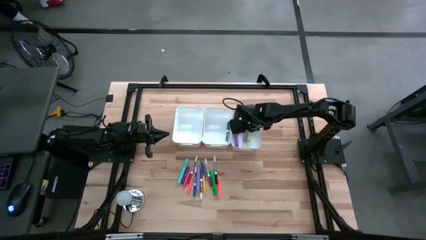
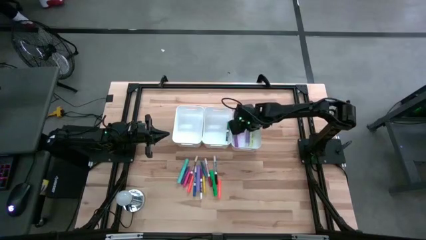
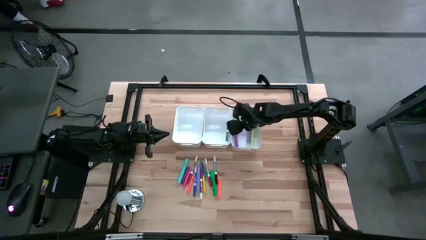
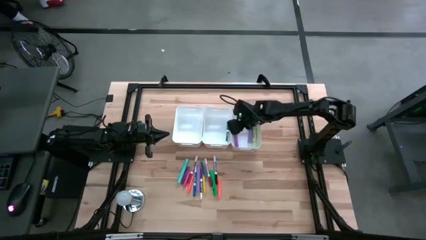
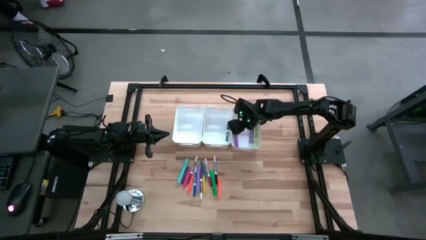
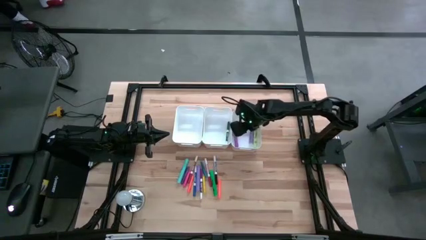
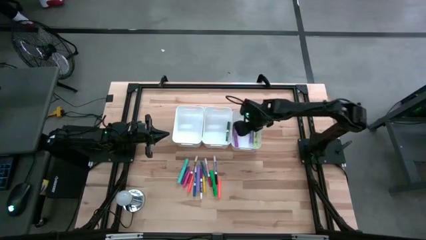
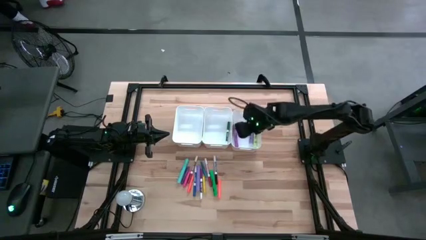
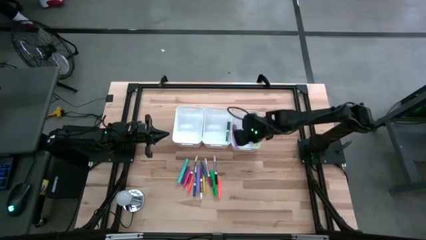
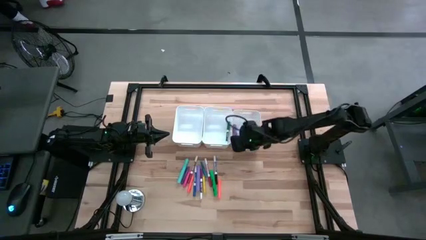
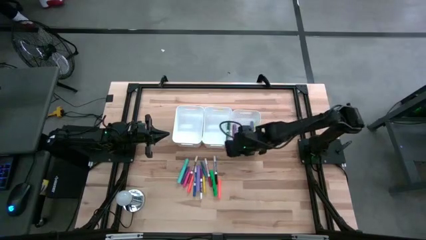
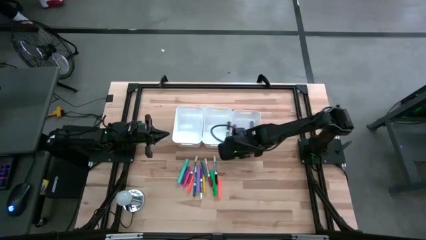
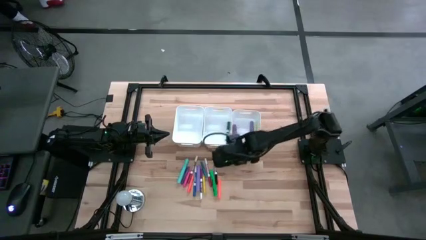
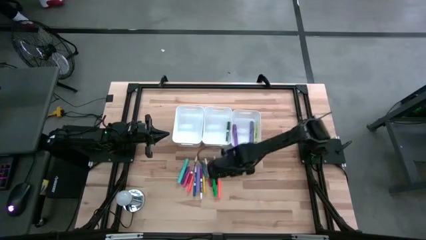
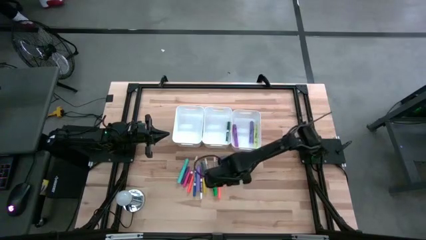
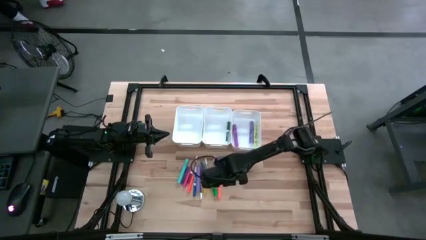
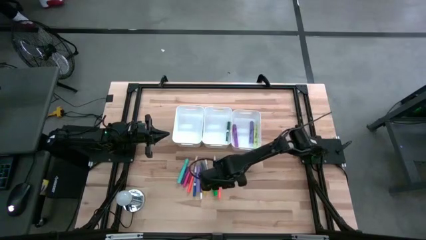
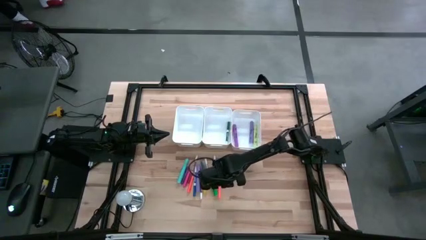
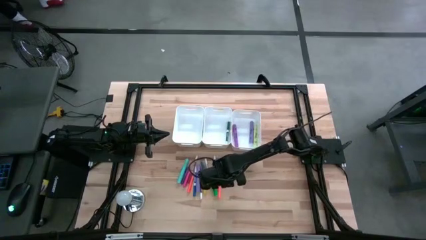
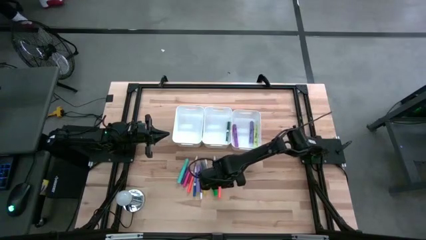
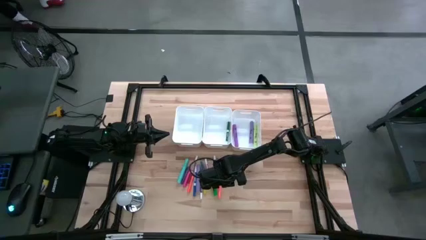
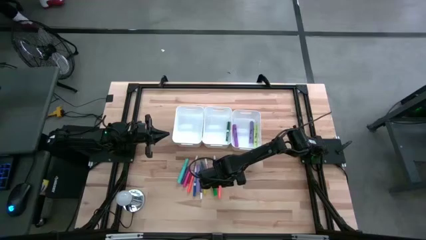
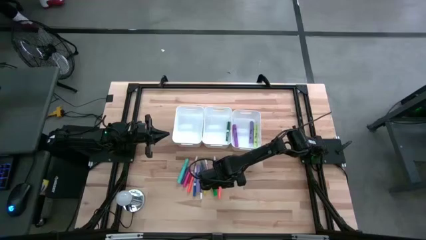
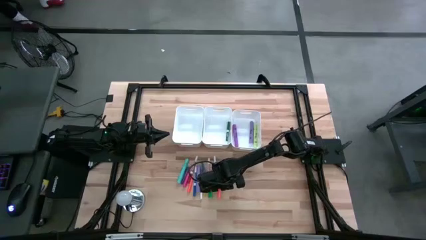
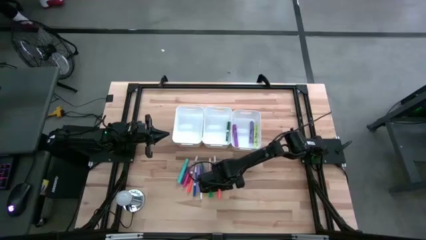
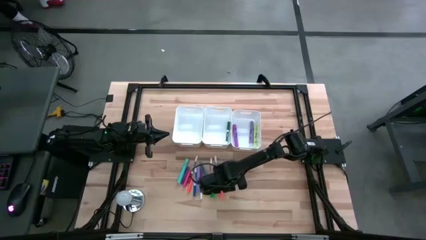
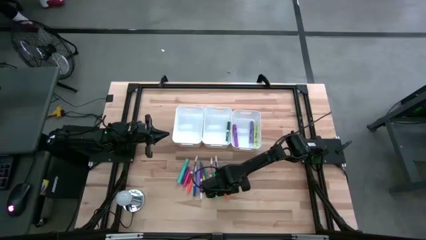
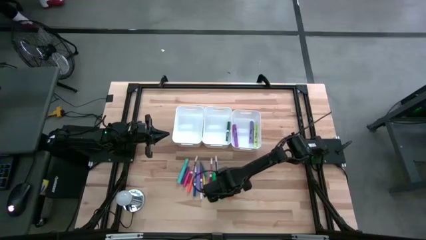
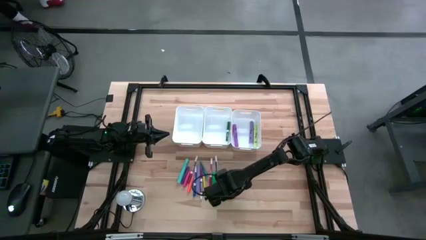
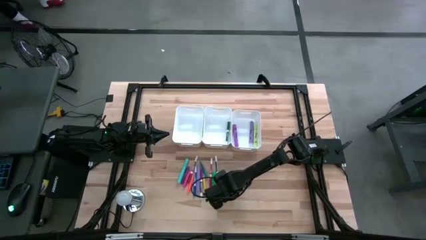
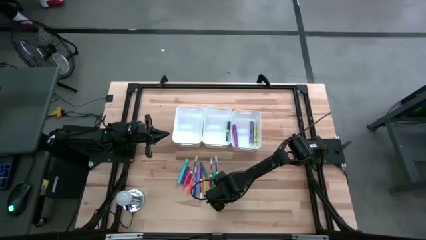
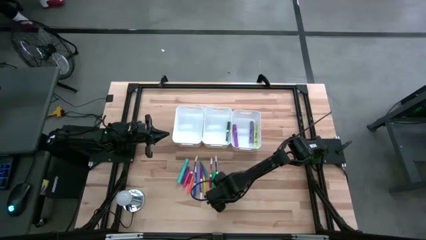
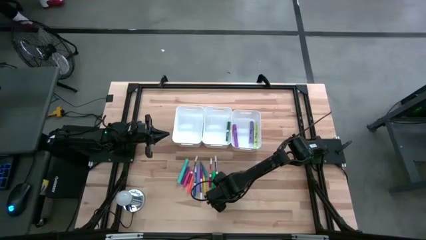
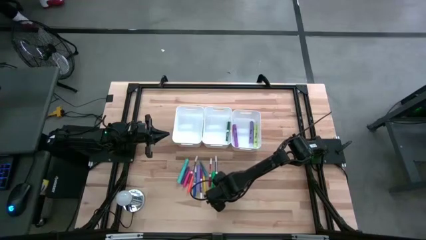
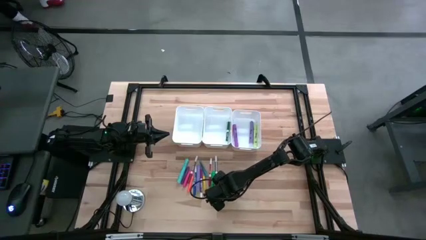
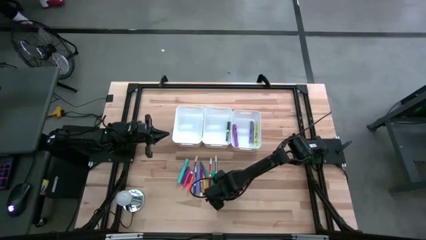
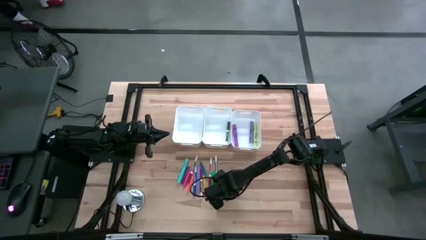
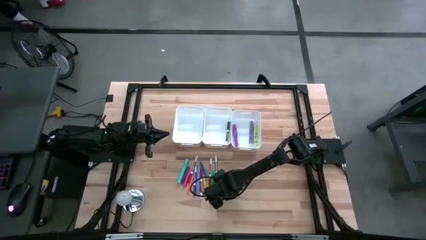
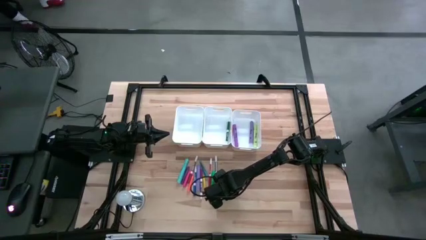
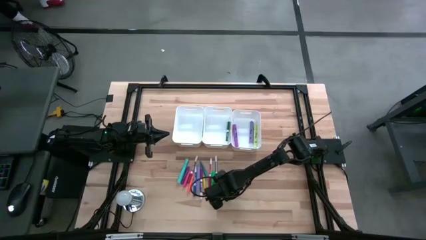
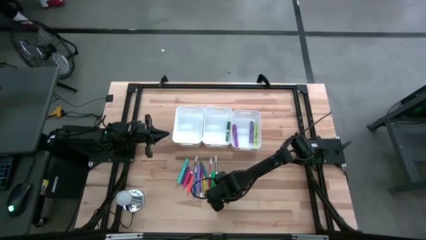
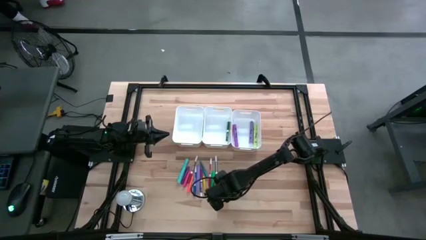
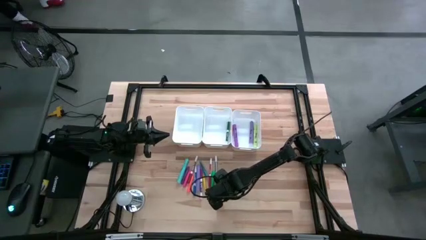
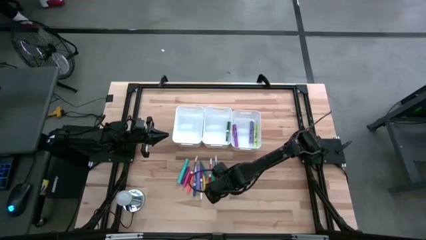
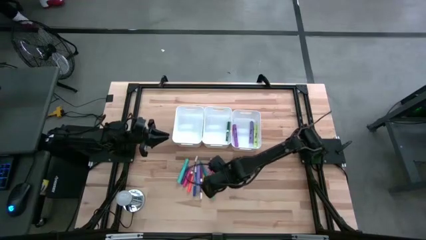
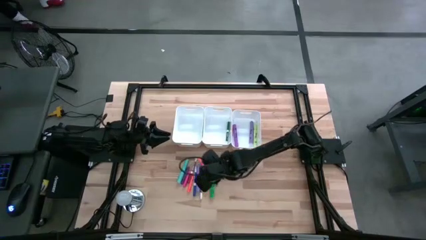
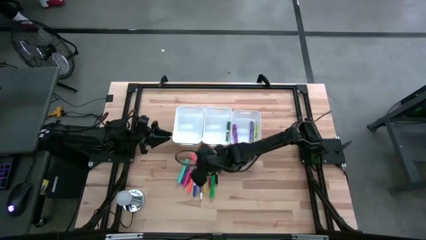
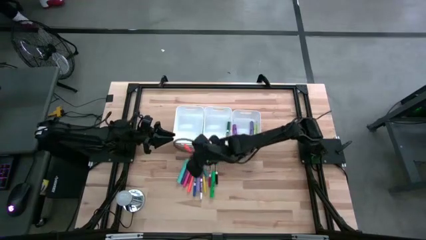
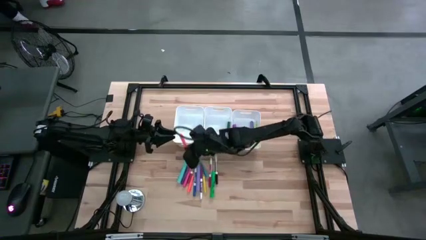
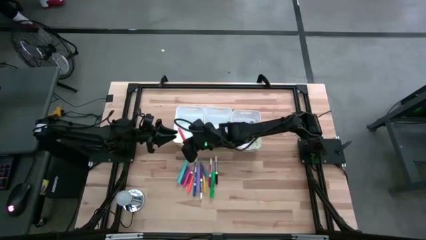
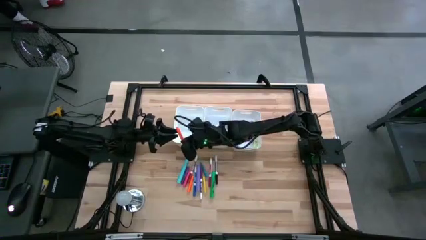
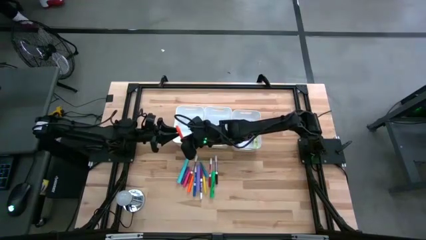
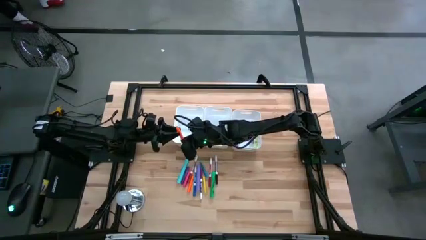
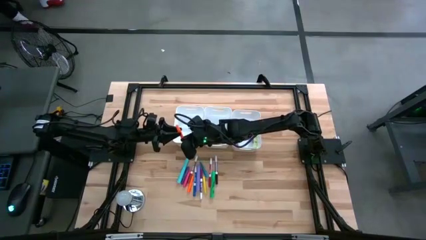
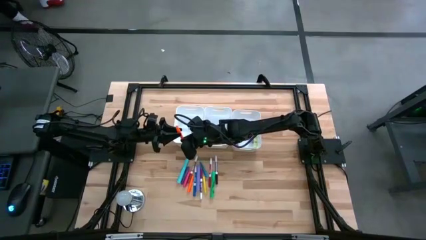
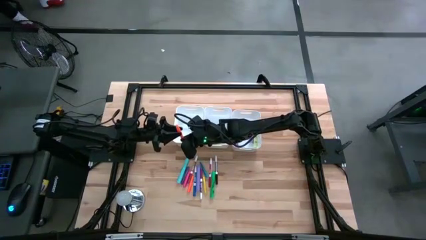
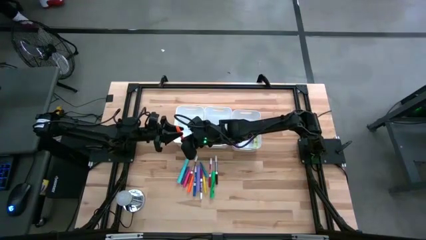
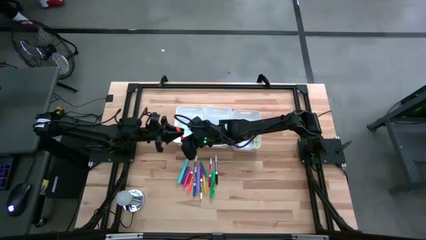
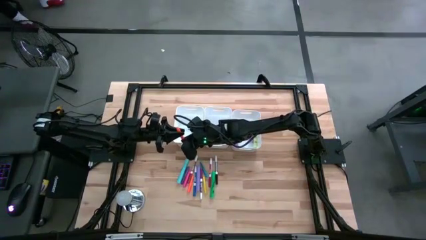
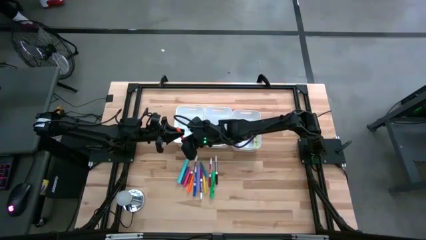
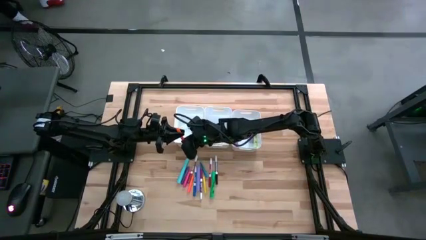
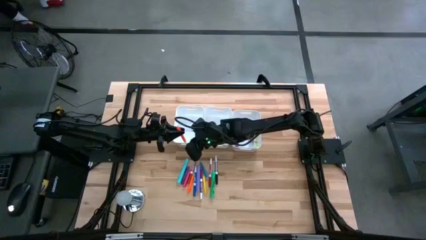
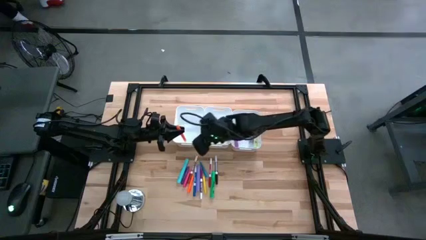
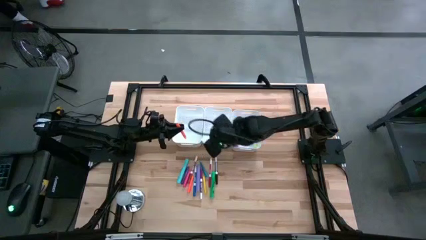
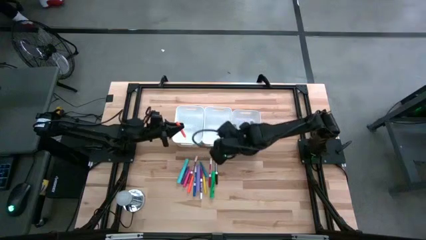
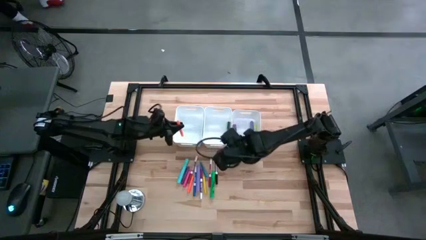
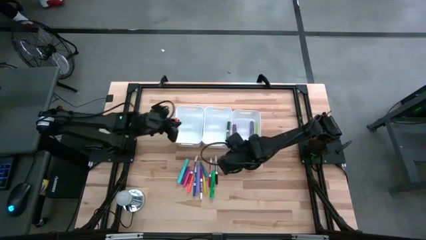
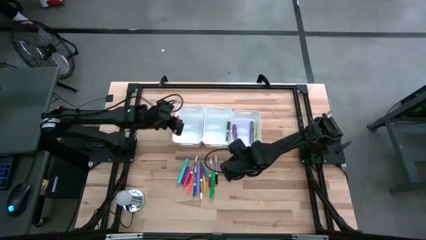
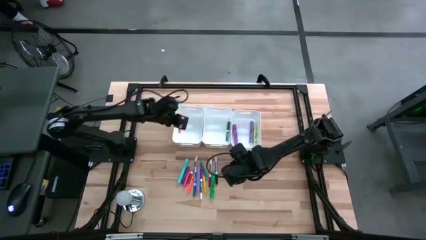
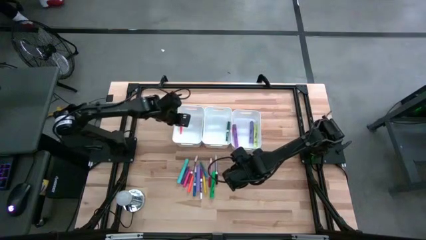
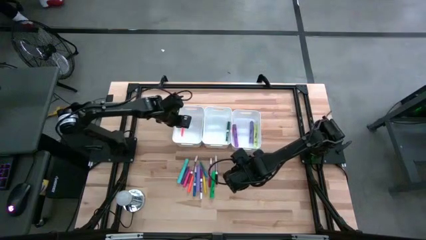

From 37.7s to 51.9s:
Task: Pick & Place Markers
Put the right orange pen into the left white bin

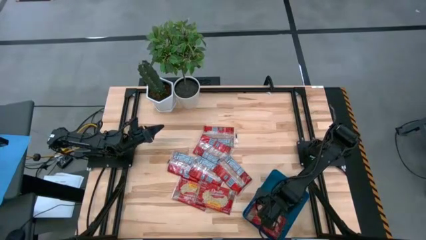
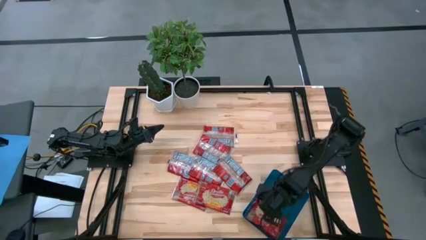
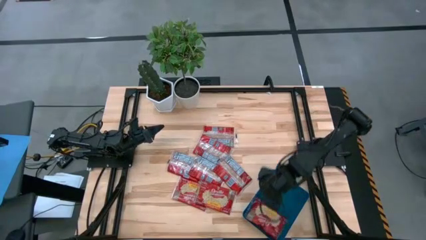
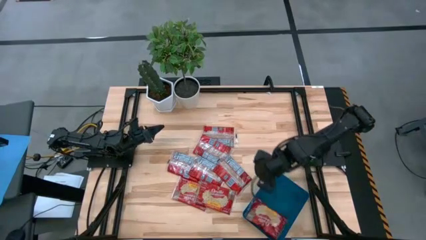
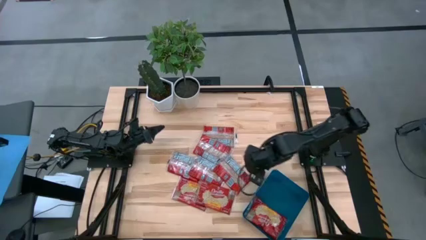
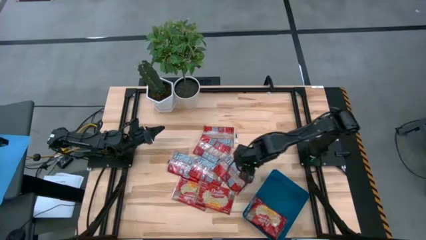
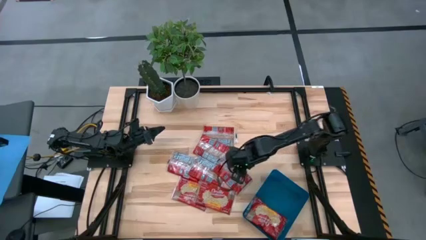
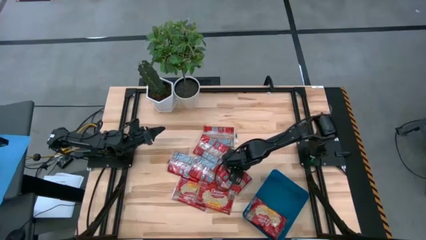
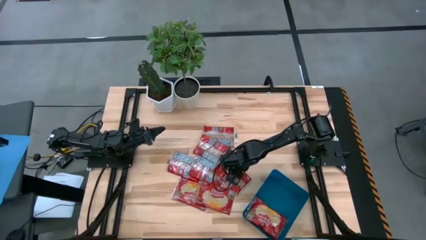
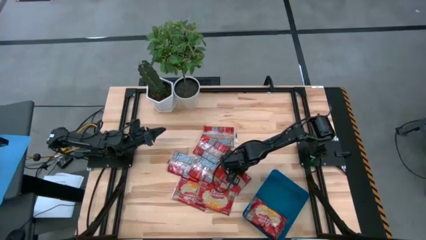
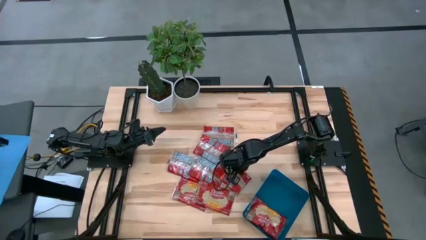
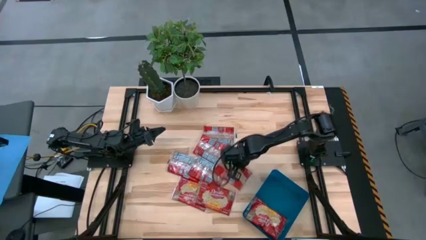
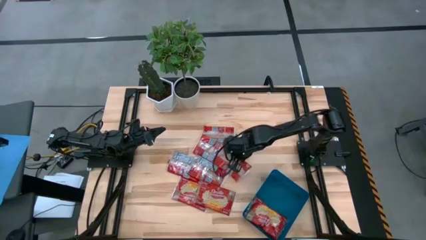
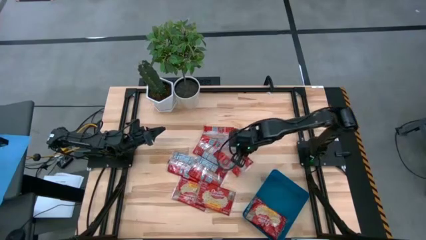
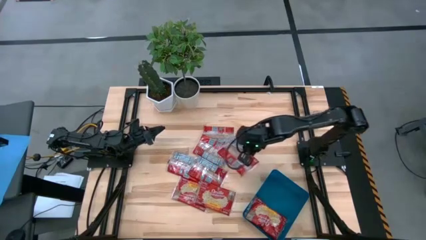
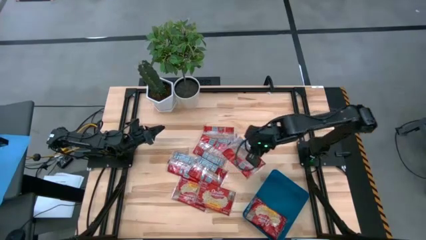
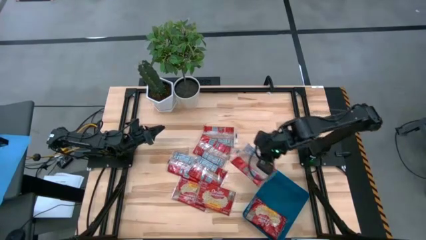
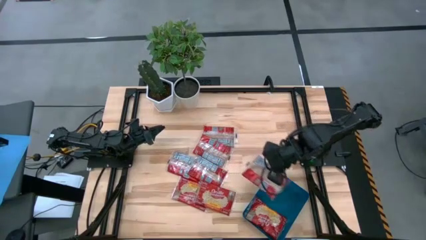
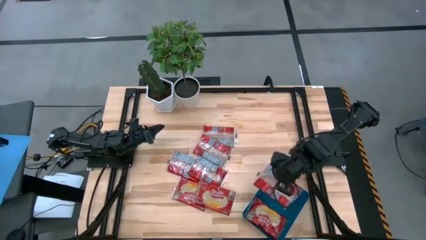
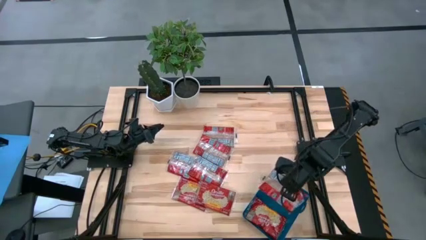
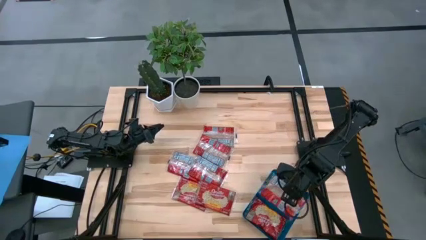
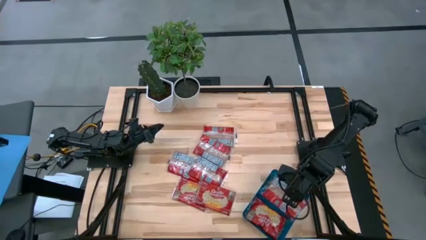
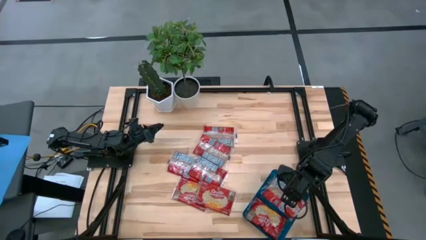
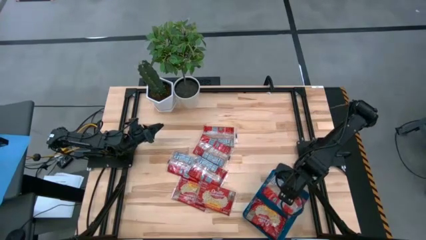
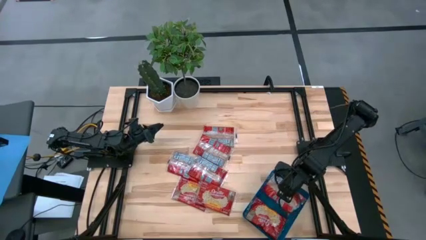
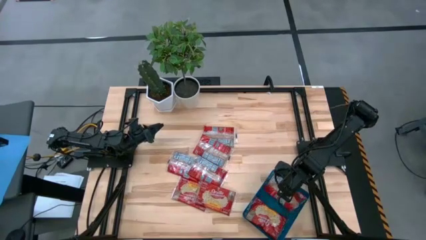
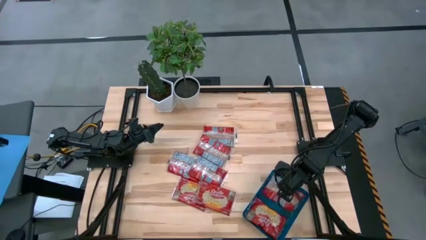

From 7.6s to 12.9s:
Task: Sort popcorn bags into baskets
Put the red popcorn bag into the blue bin
